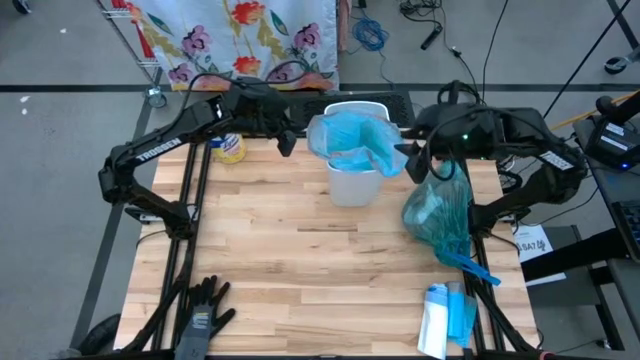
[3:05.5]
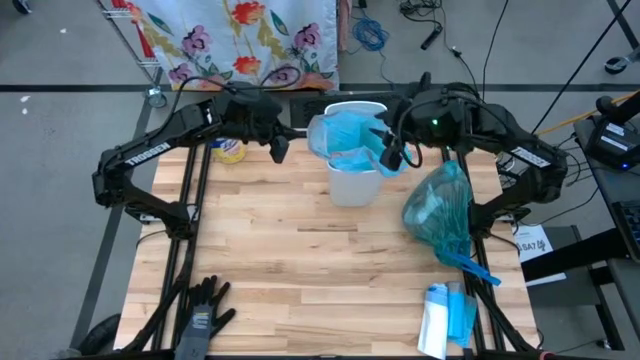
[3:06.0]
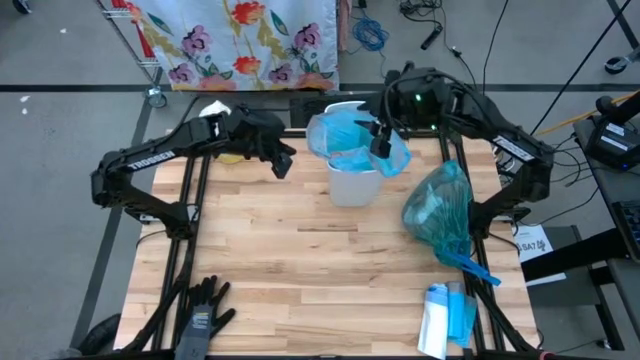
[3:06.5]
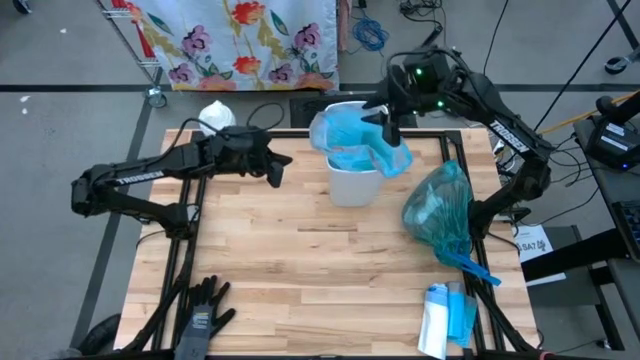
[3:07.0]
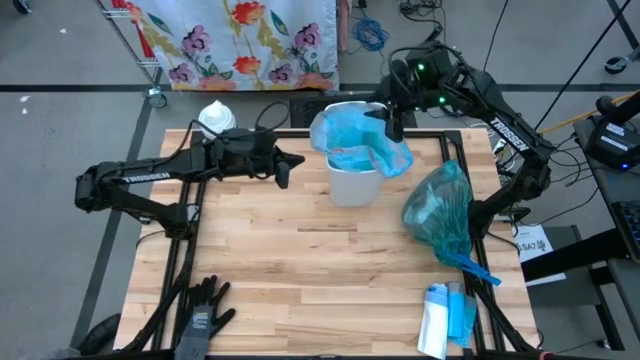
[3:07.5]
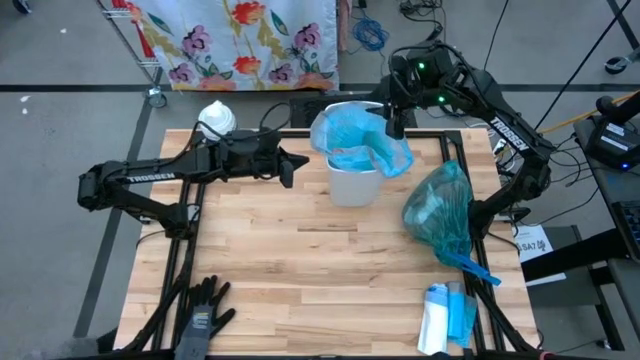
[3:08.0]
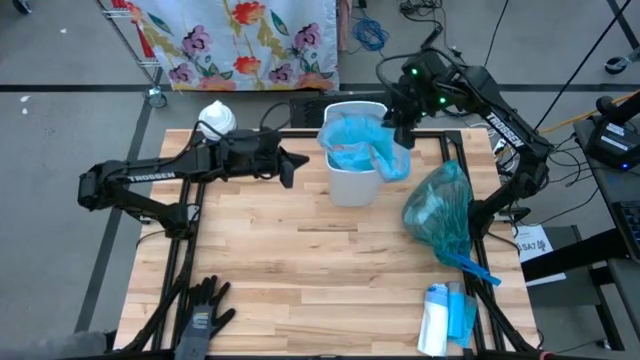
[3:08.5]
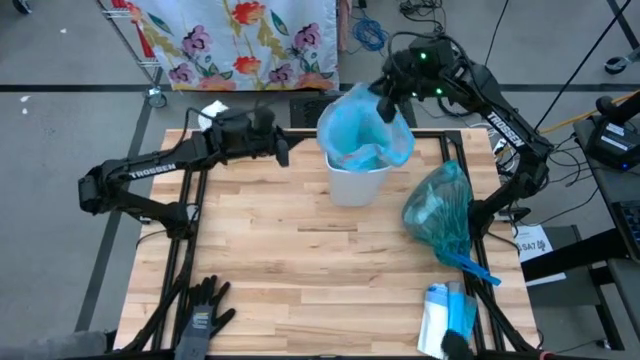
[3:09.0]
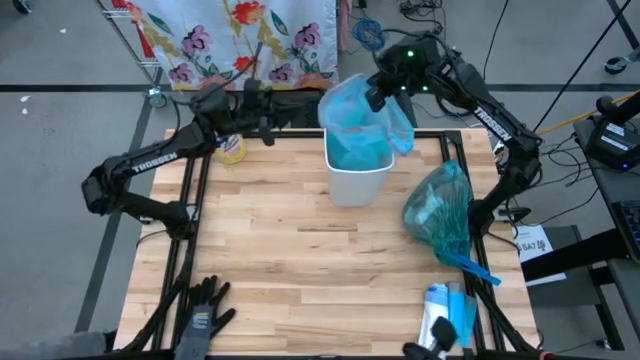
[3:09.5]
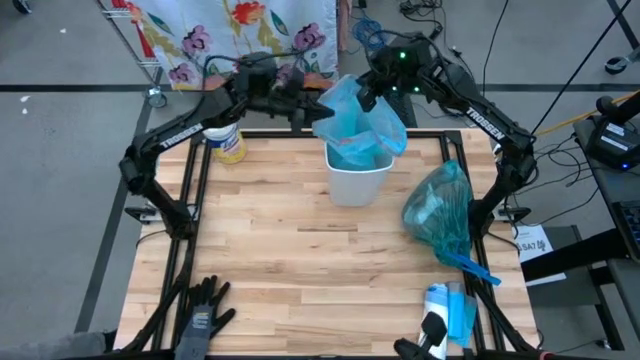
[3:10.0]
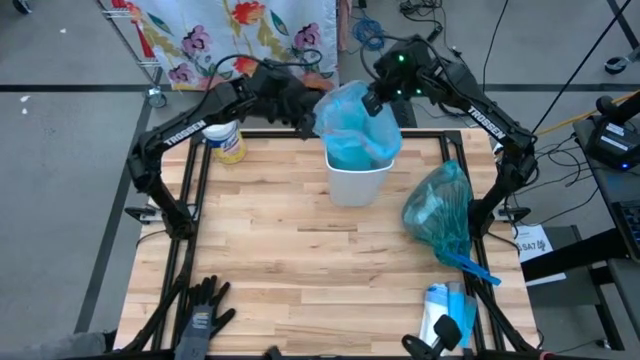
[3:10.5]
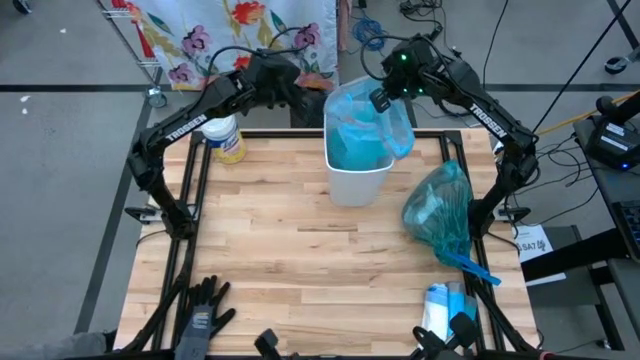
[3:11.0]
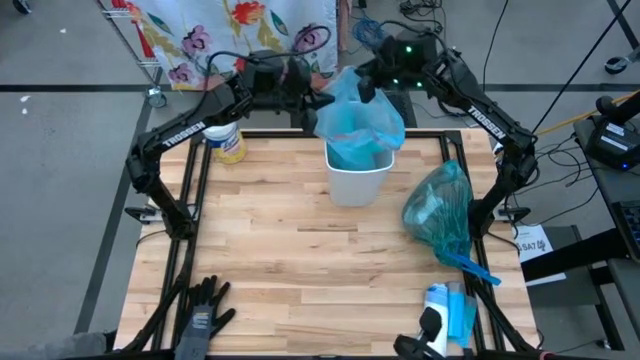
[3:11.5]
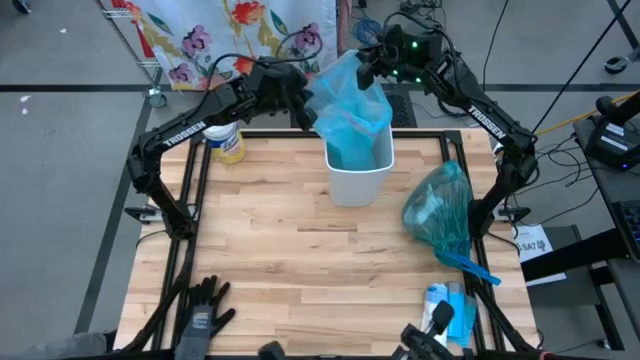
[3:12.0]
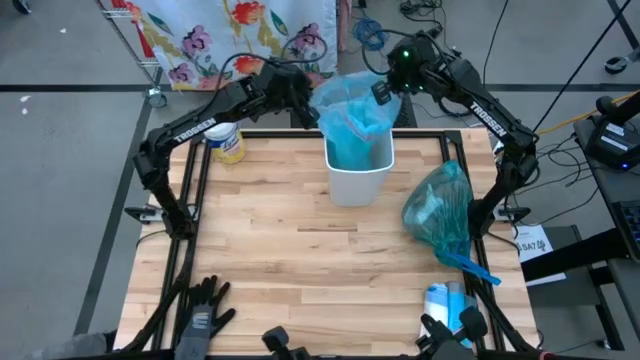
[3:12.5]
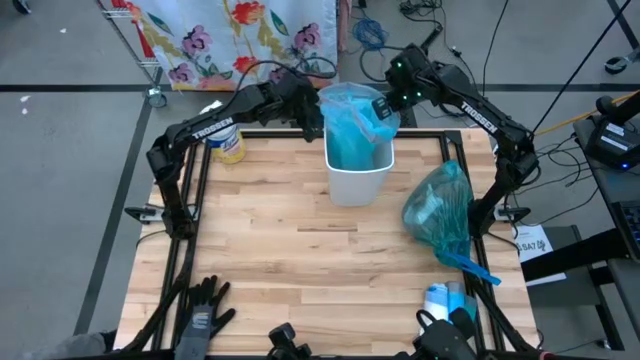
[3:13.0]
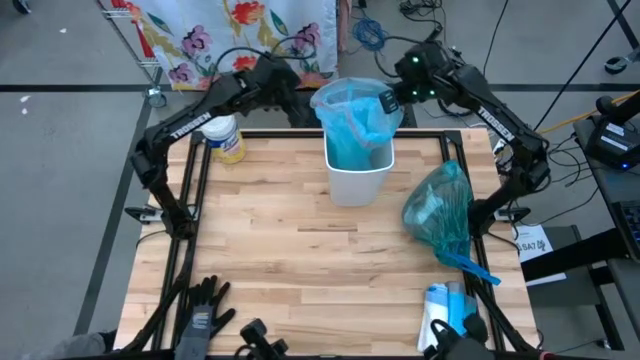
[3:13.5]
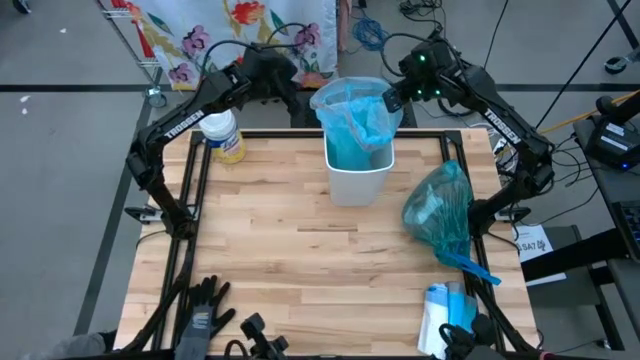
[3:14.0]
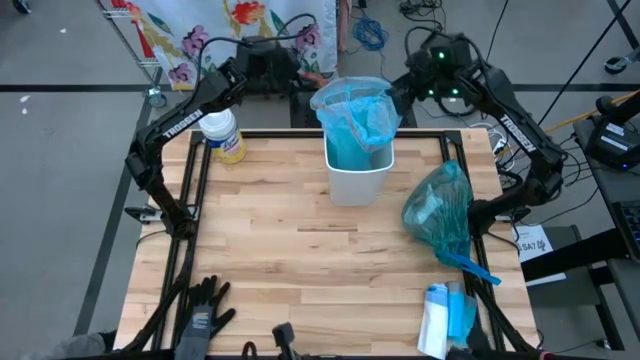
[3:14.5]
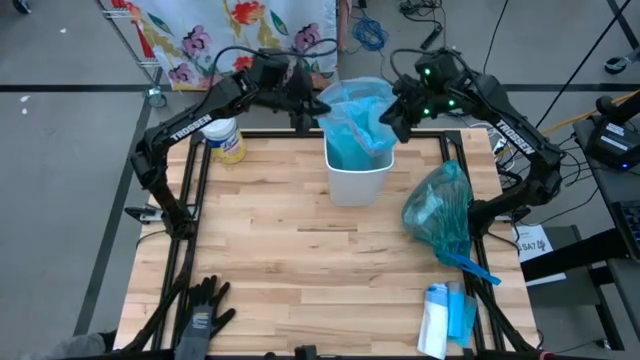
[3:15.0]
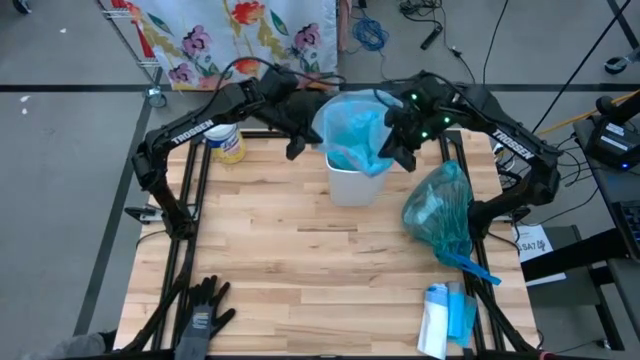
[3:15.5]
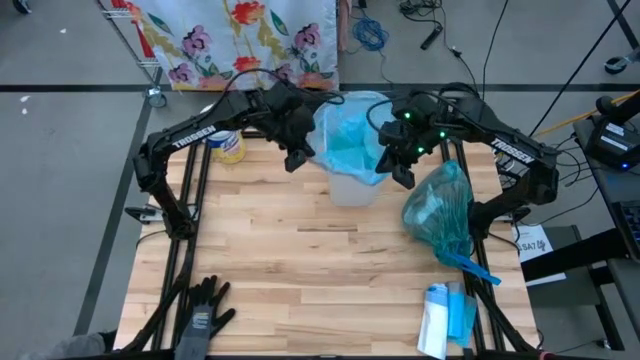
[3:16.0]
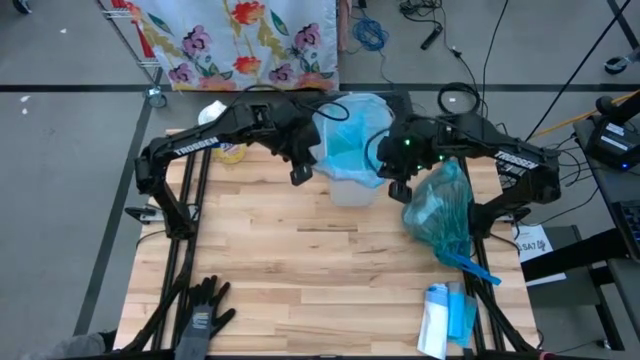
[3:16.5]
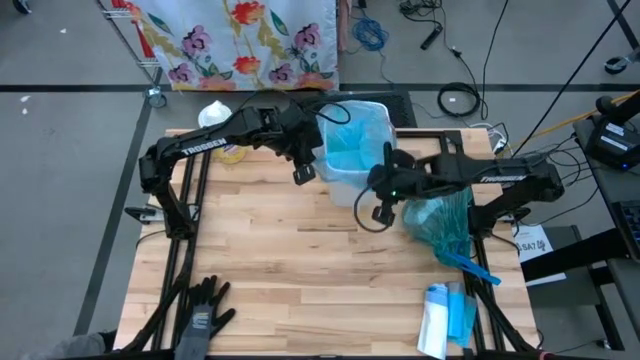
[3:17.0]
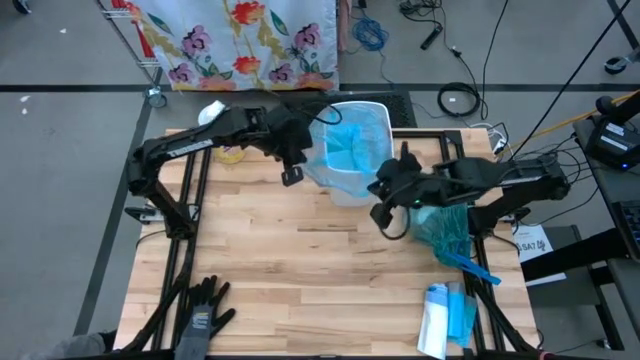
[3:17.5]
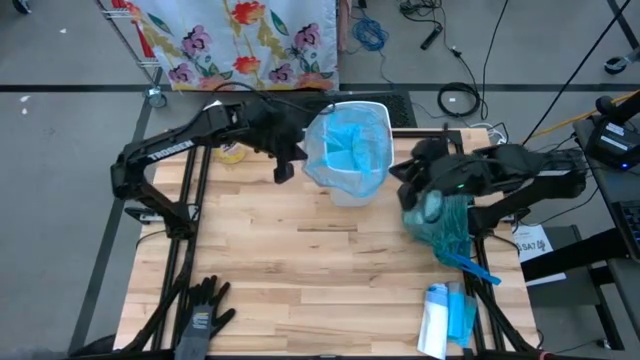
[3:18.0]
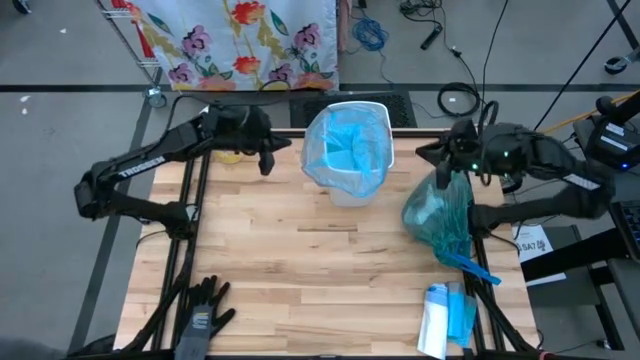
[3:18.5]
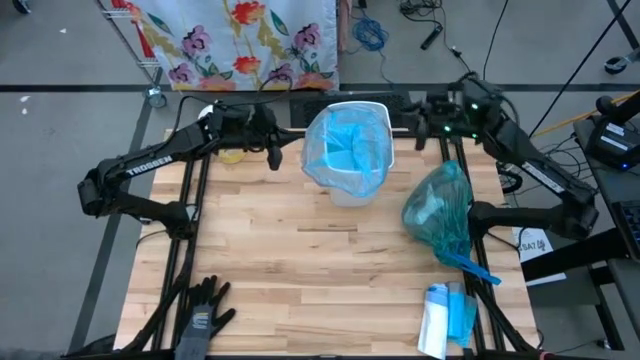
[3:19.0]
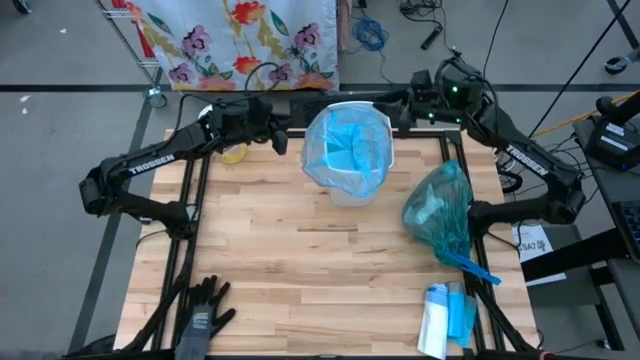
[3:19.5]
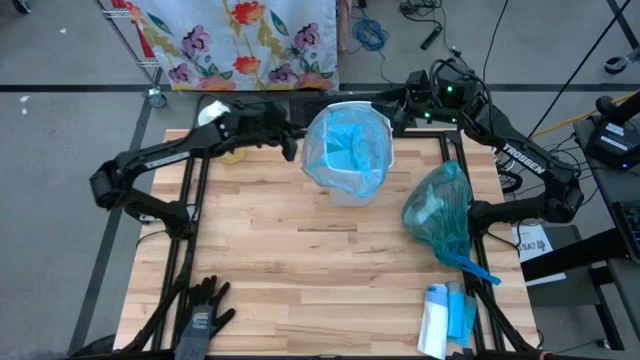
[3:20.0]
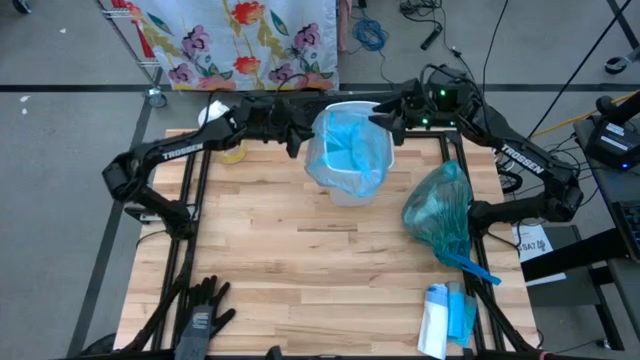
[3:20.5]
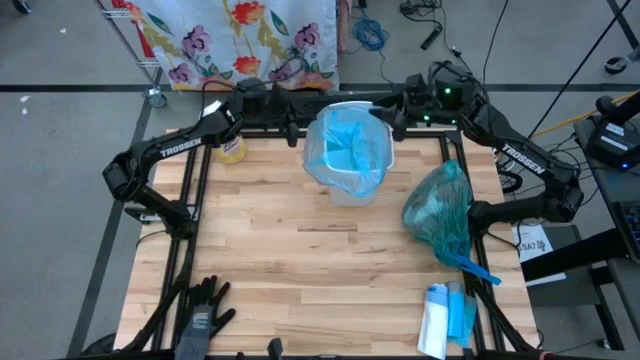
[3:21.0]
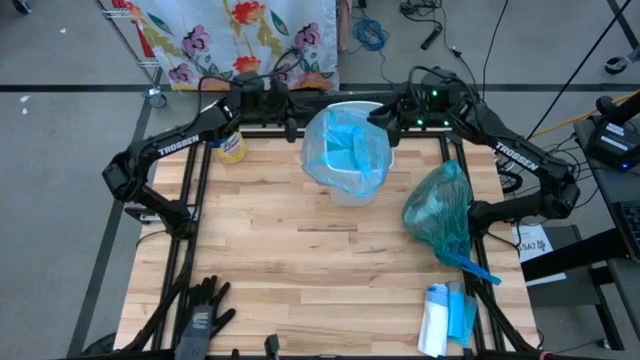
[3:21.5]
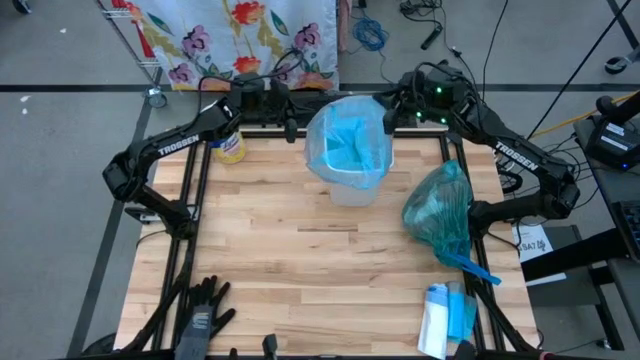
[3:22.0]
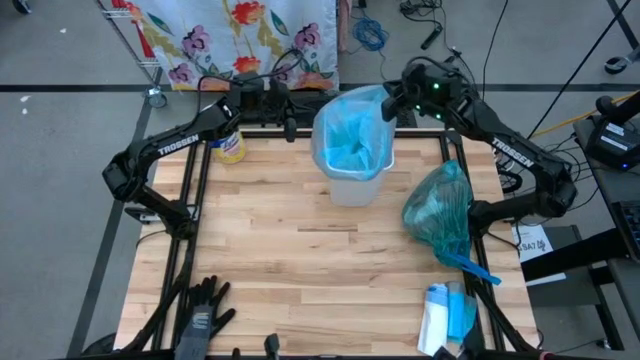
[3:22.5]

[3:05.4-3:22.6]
Task: place trash/remove bag and relplace
Insert a new trash bag into the trash bin

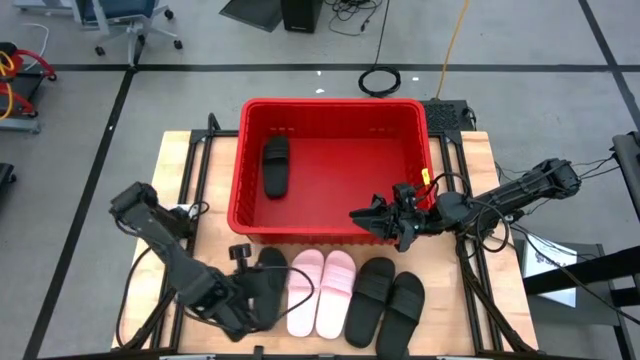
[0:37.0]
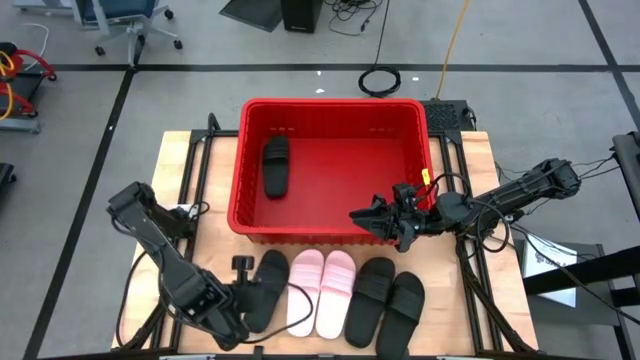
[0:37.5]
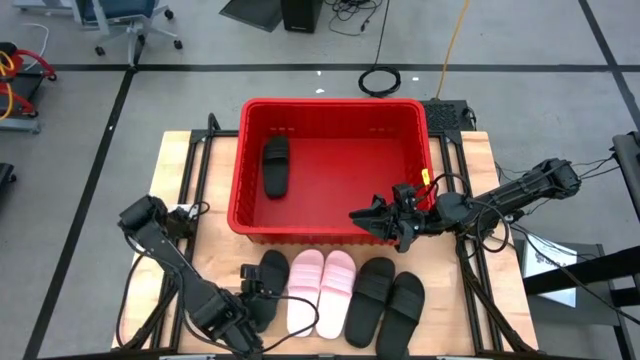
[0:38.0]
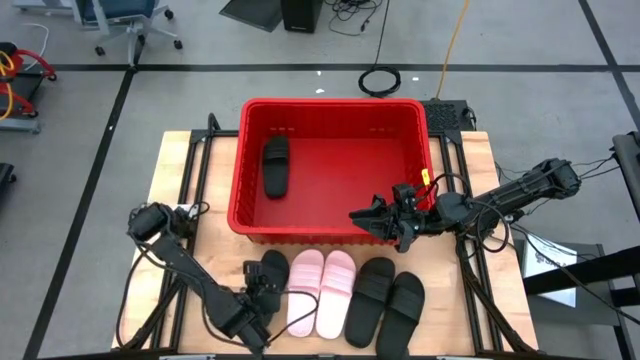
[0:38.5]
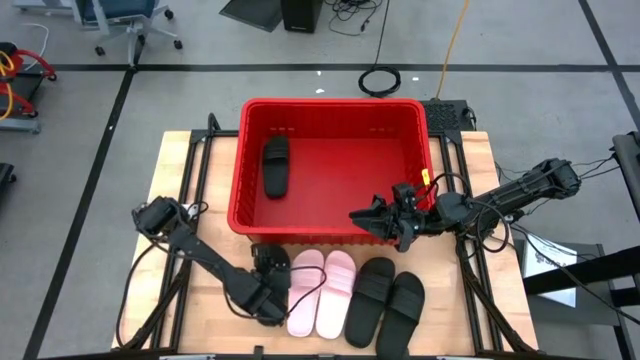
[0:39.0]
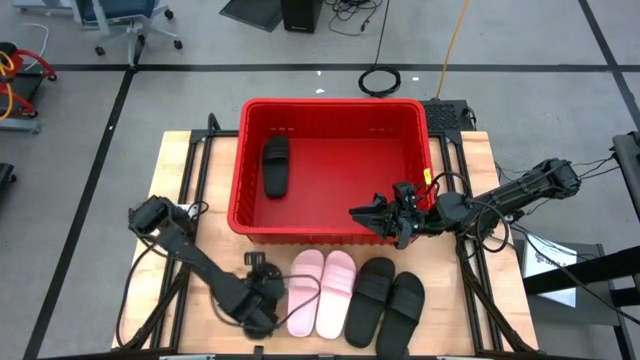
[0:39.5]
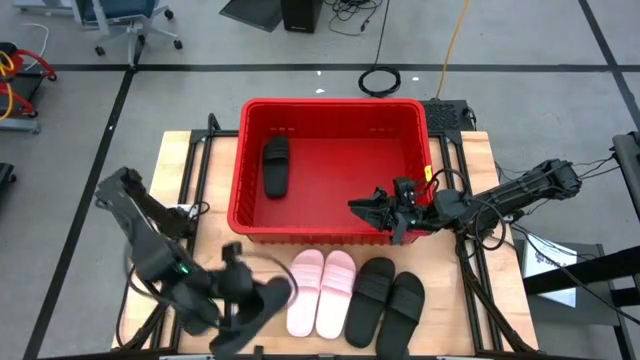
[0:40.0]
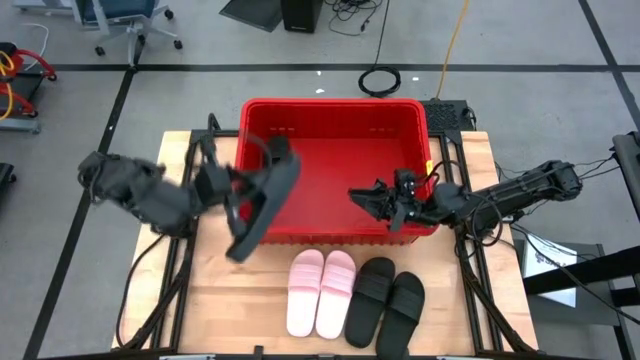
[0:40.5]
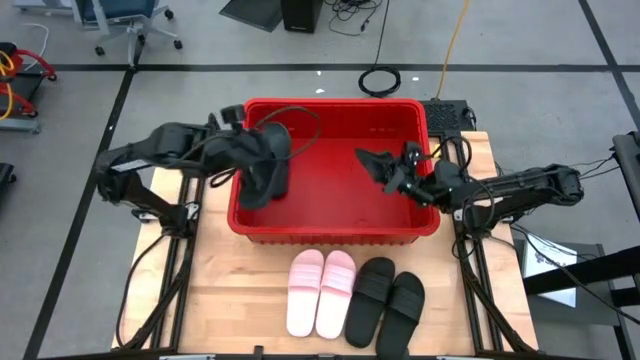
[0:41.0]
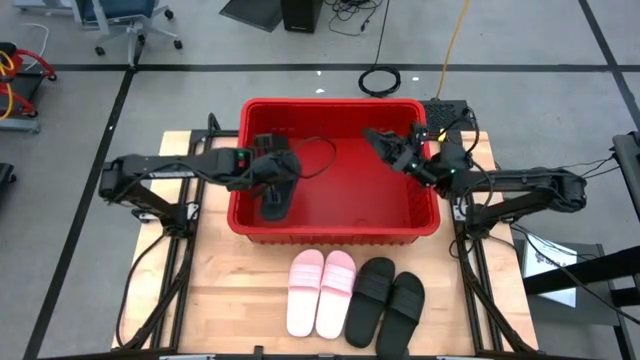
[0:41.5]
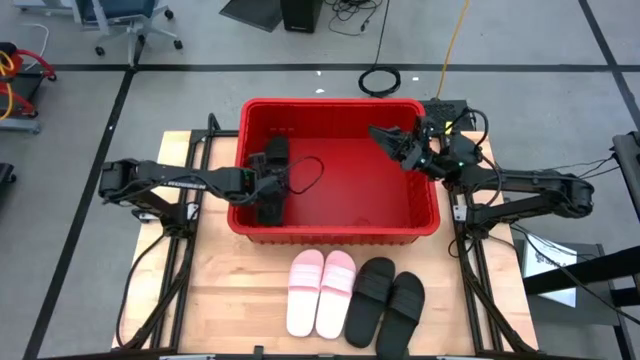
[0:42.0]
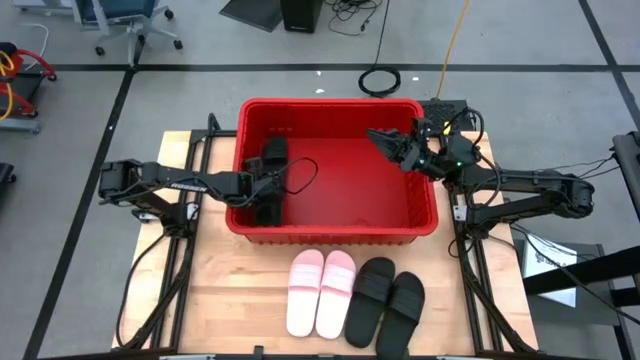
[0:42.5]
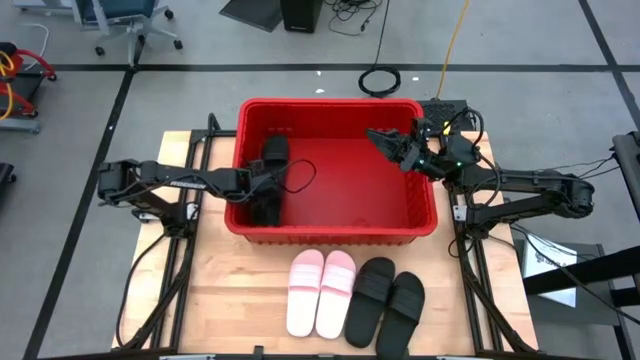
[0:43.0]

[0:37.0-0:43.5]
Task: Pick and place slides into bin
Put the black slide into the red bin
